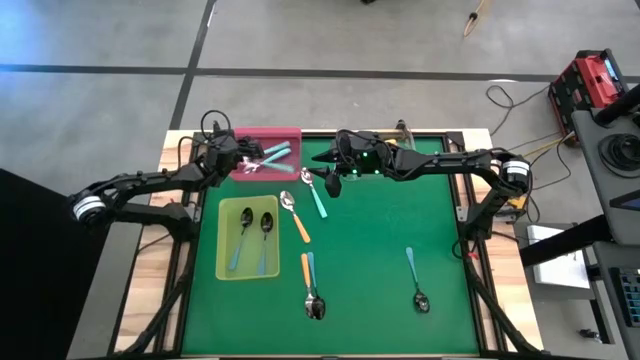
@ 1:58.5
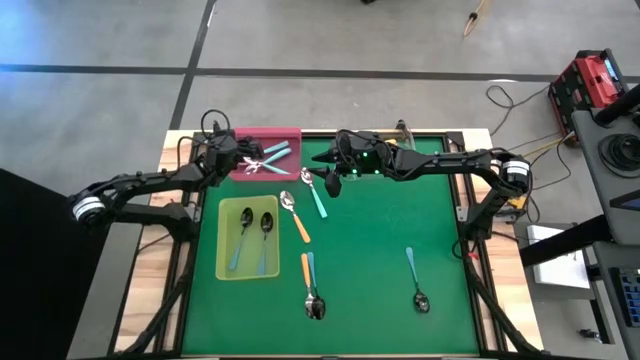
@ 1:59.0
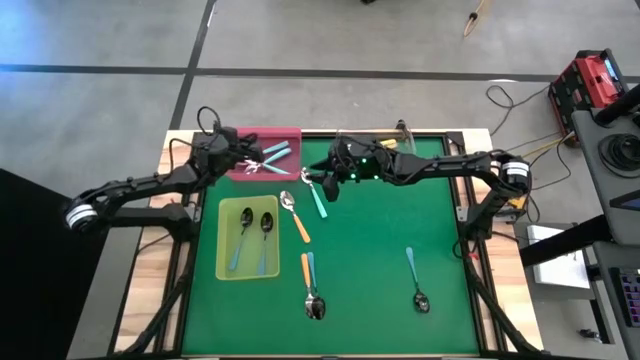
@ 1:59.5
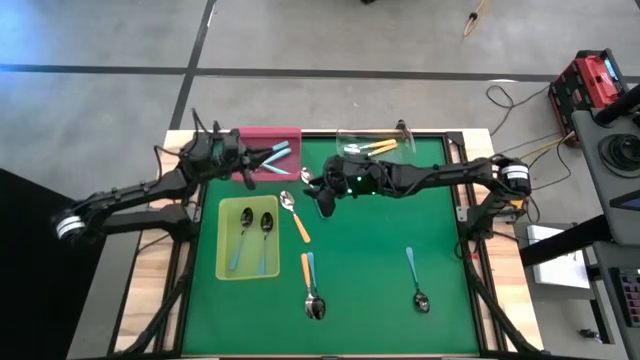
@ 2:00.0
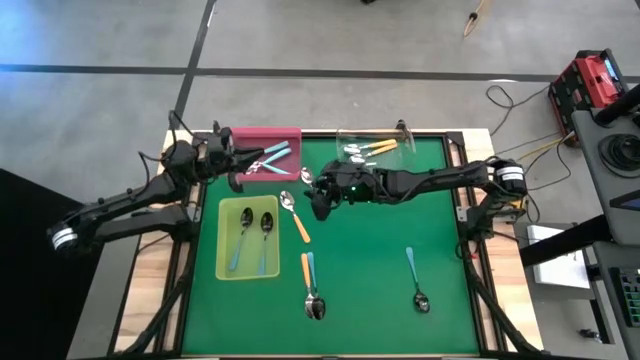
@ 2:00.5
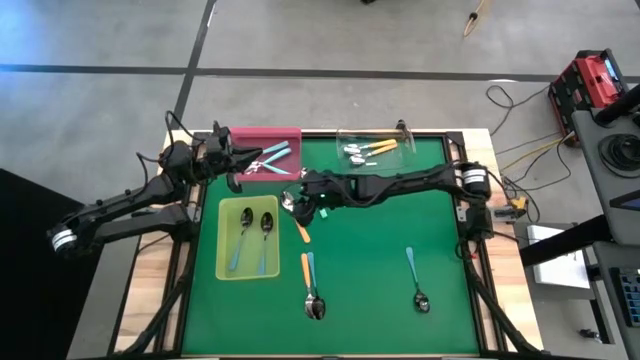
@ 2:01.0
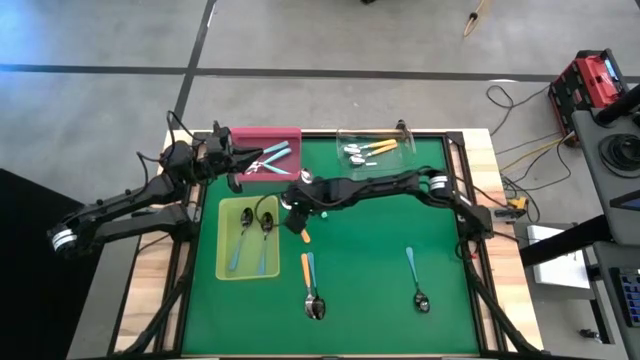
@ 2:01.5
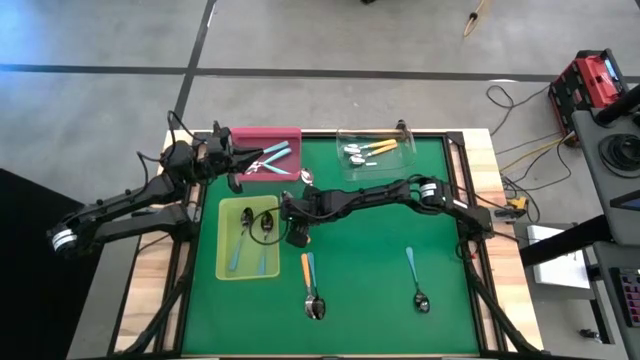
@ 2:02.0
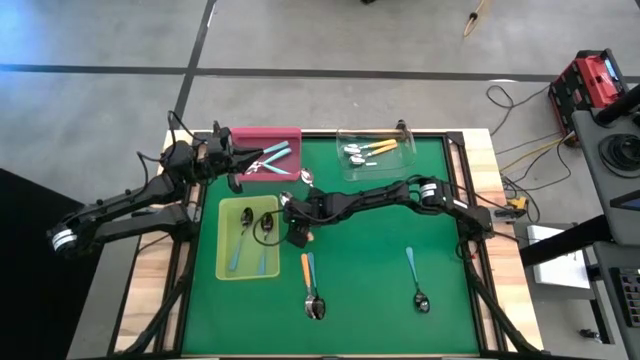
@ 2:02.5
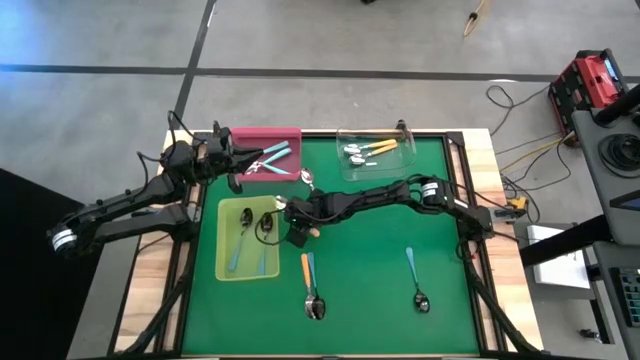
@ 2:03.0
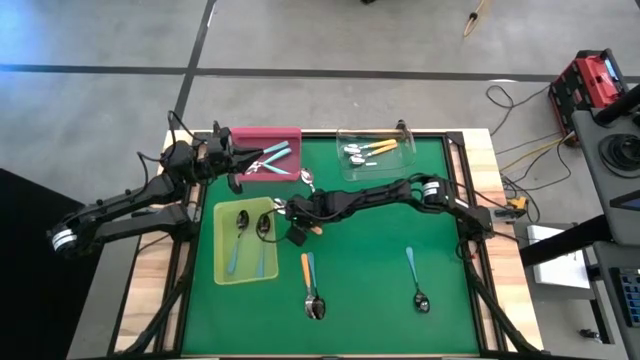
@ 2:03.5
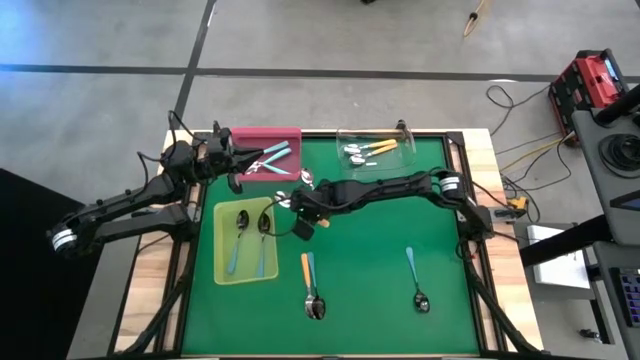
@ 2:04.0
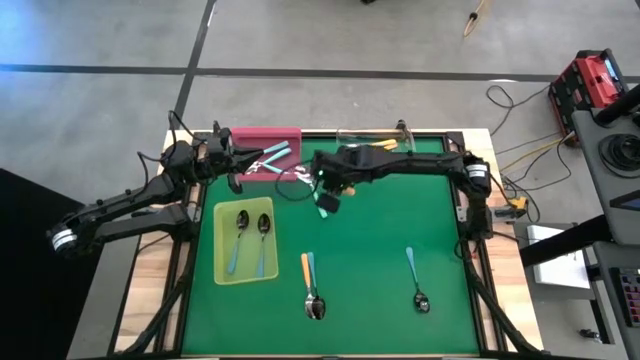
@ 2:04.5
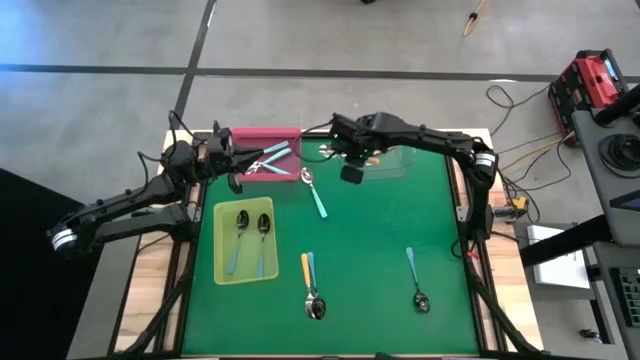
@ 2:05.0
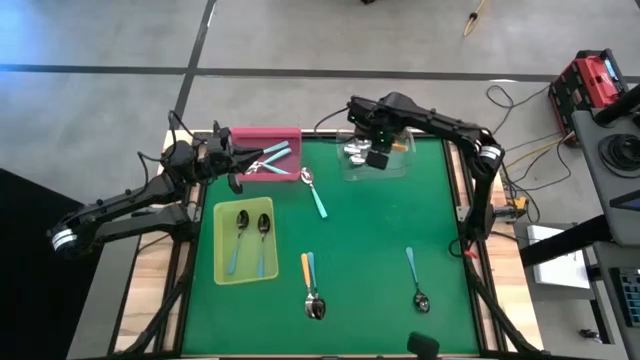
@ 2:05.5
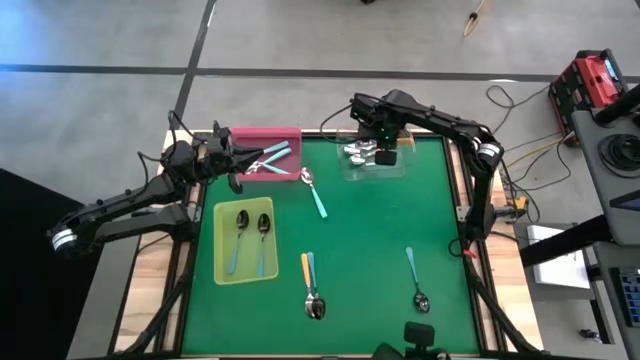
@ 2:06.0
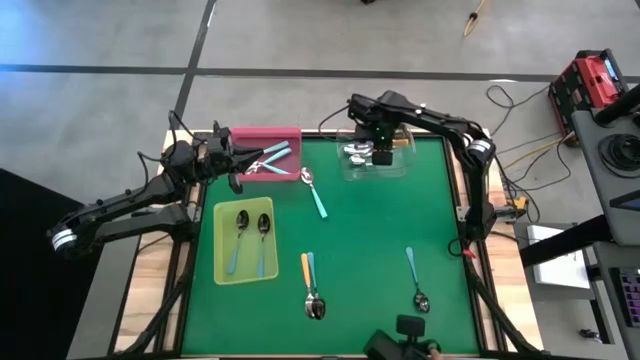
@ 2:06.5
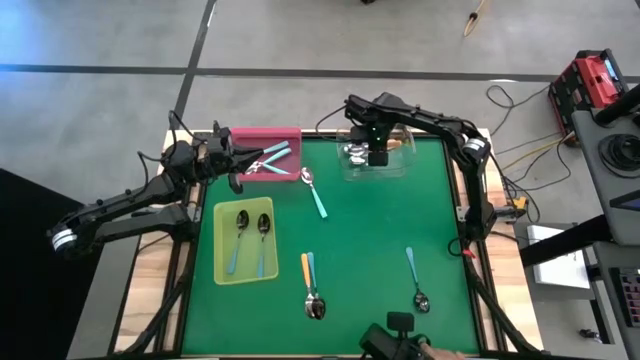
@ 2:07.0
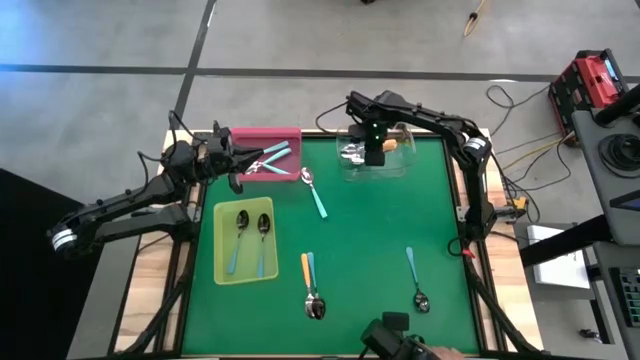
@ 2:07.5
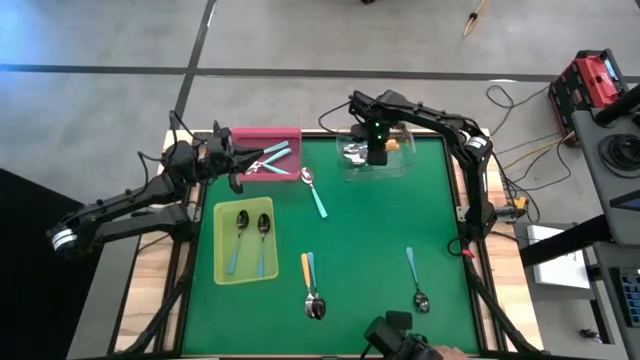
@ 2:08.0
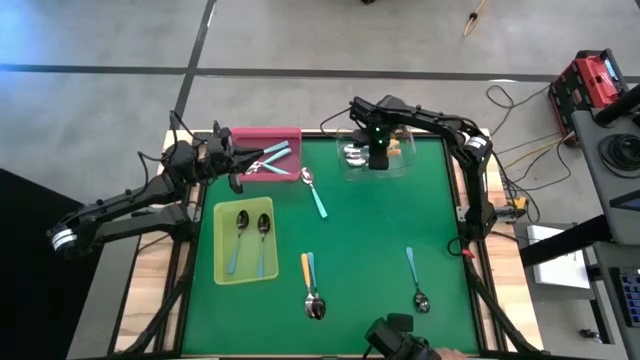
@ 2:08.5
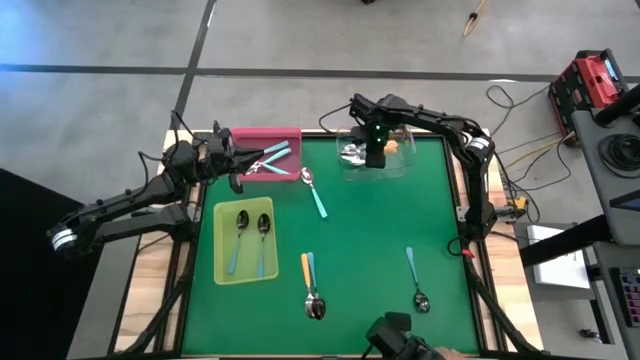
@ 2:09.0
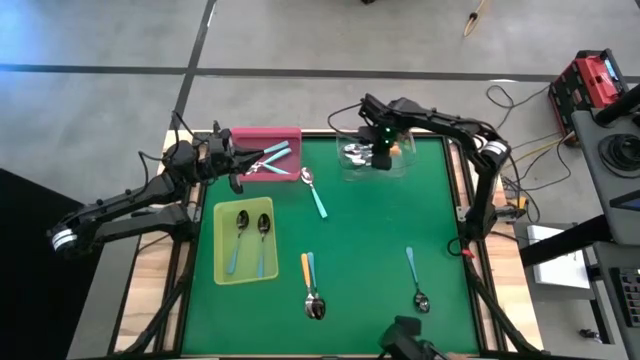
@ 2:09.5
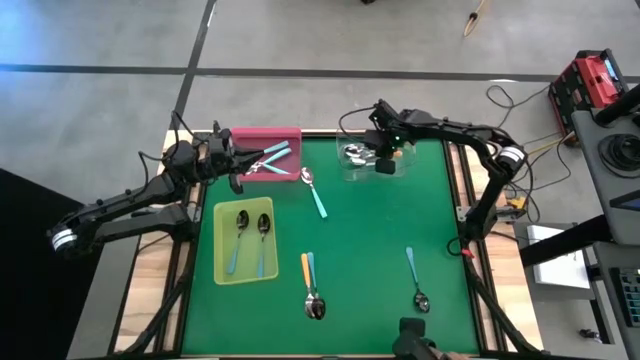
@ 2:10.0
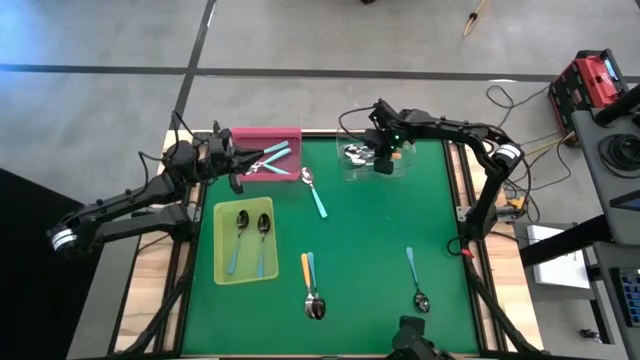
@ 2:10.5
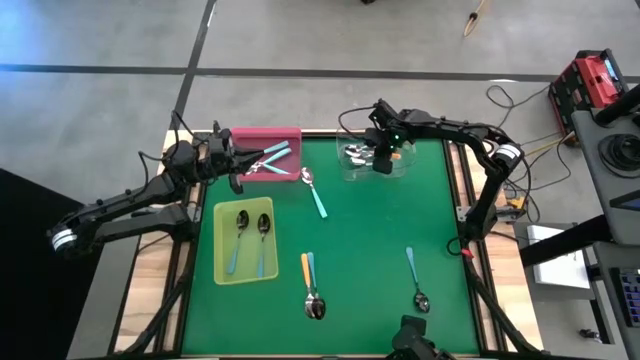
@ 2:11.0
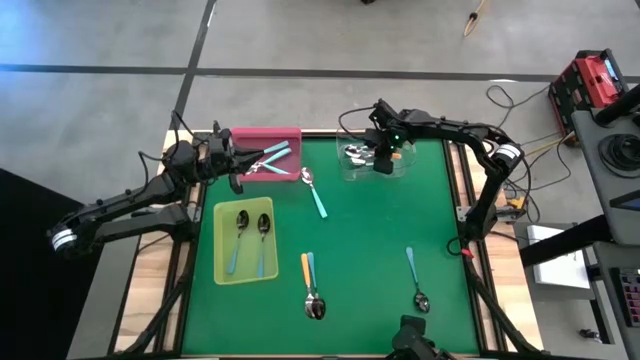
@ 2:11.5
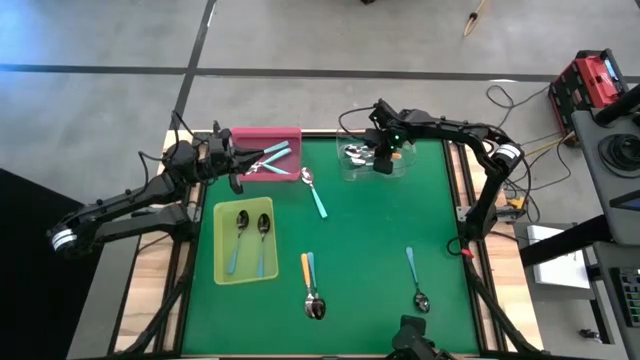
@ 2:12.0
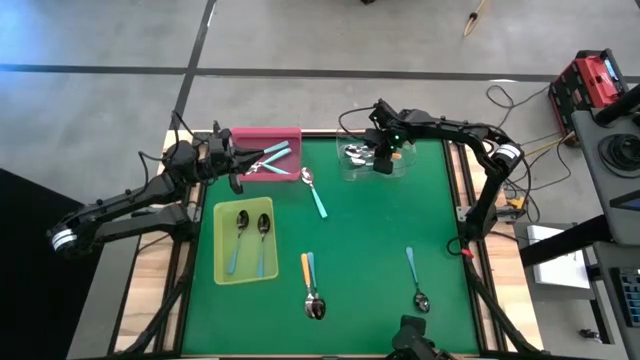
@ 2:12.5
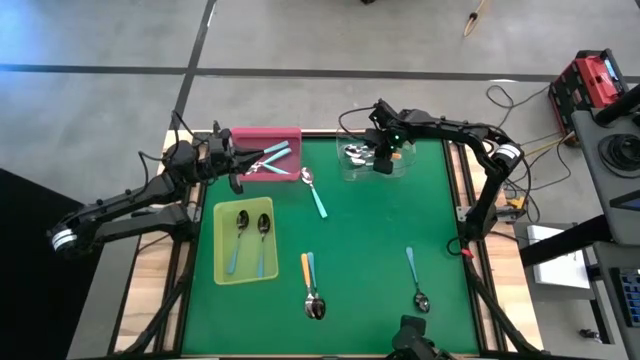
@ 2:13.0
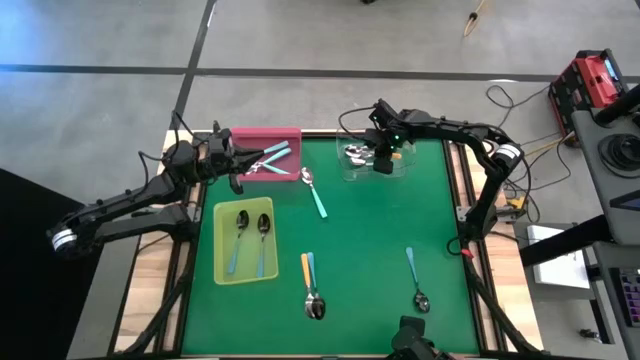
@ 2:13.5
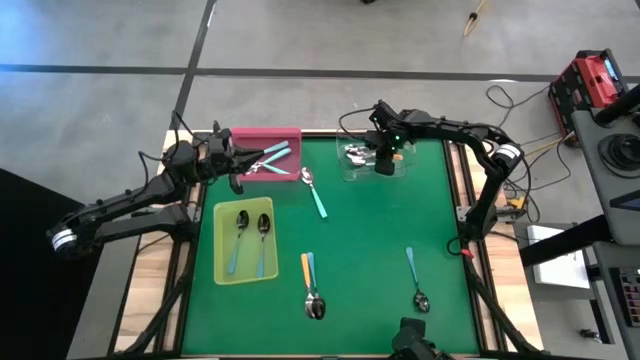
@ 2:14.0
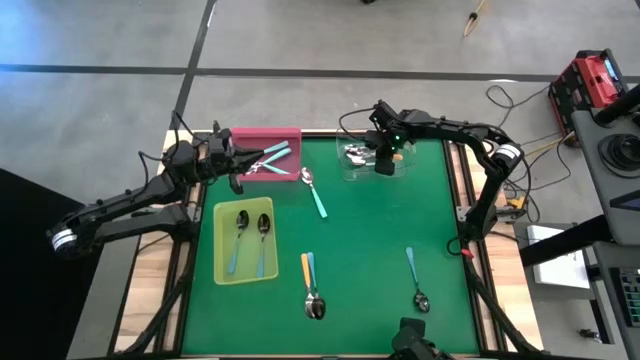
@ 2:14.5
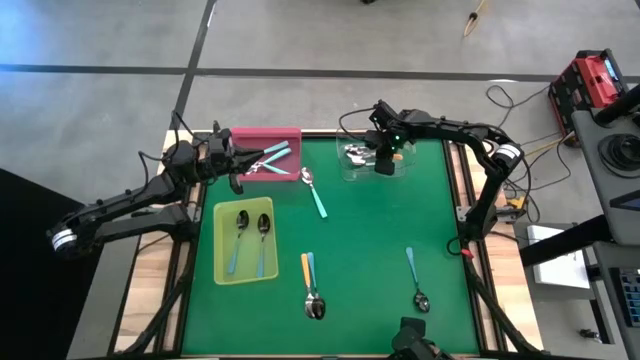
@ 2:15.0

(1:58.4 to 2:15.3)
Task: Sort silverware by color (type)
Put the yellow spoon into the transparent bin

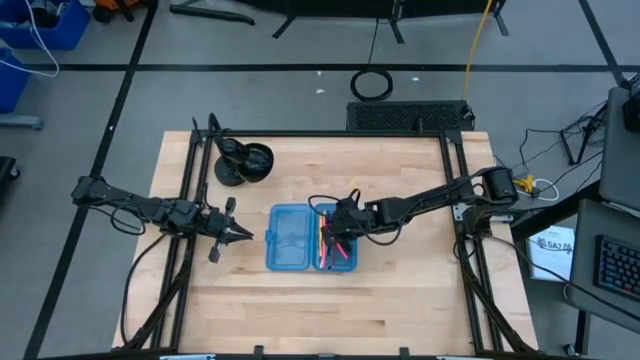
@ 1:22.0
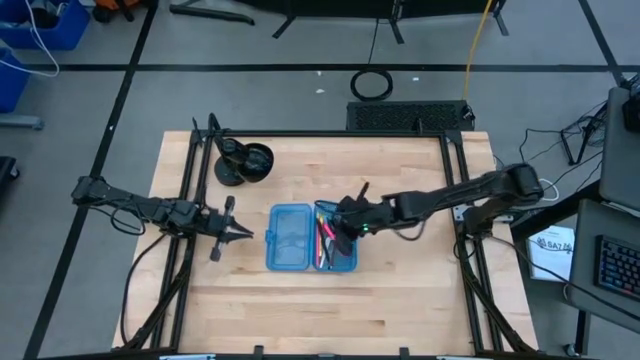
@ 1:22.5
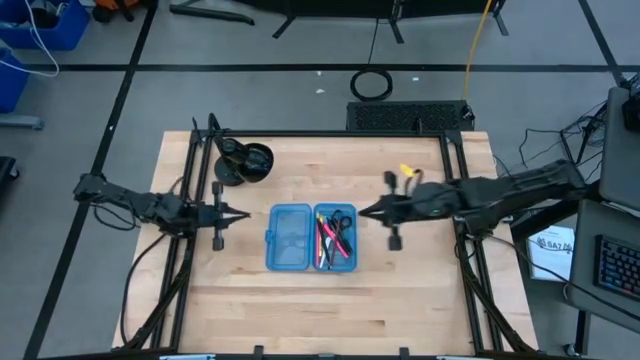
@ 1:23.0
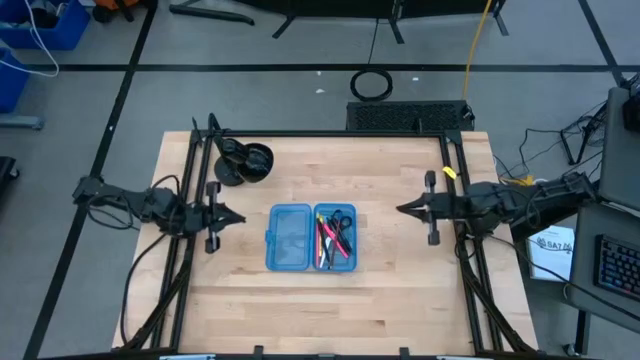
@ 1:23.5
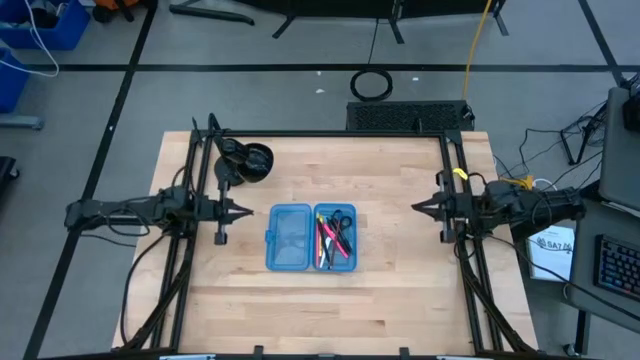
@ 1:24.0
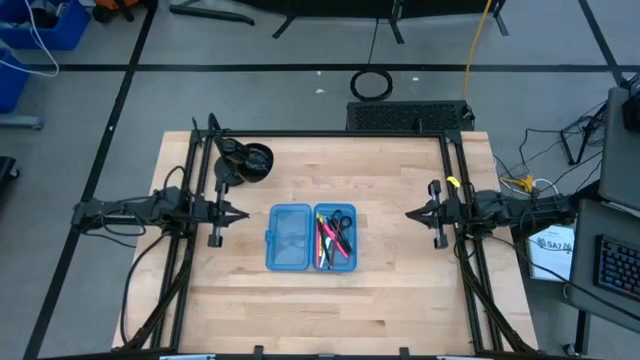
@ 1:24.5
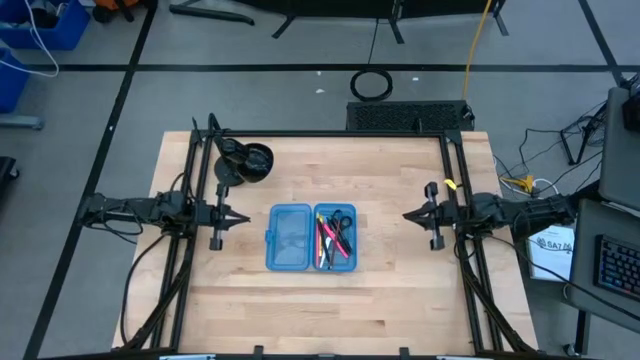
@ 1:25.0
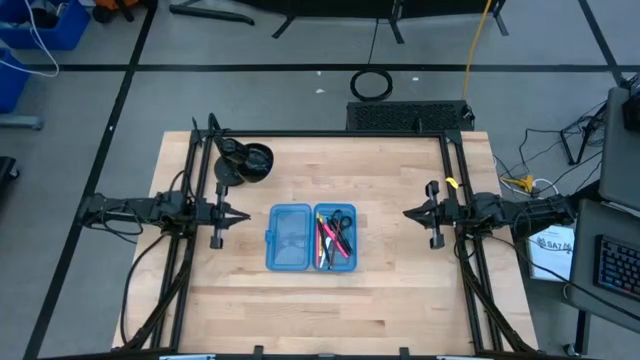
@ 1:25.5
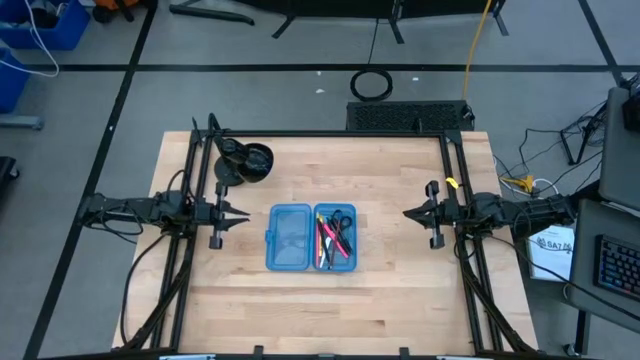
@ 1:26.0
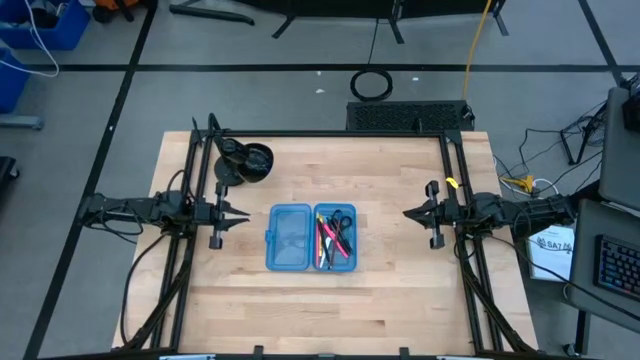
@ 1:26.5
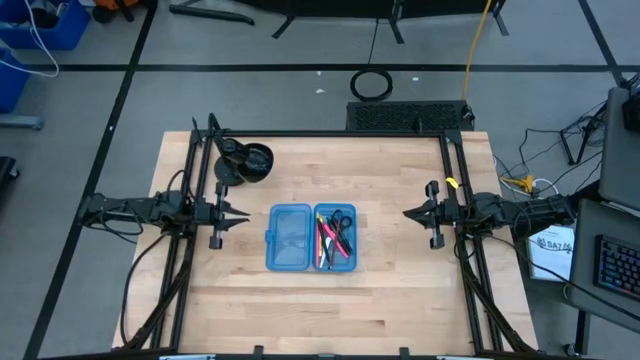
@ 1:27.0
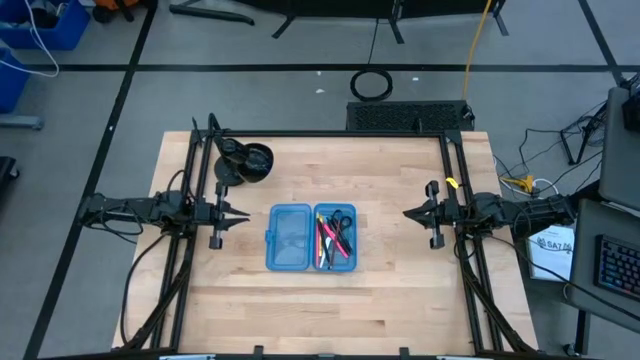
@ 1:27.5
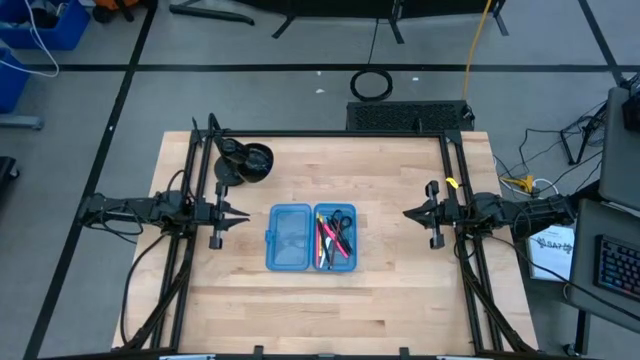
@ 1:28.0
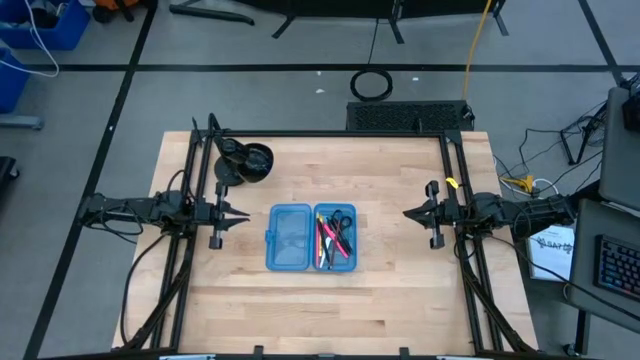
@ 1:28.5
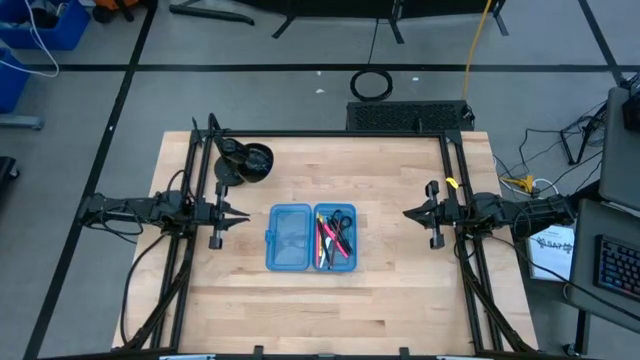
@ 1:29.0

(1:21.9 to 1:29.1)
Task: Pick & place school supplies into a supply box
Return to Home Position
